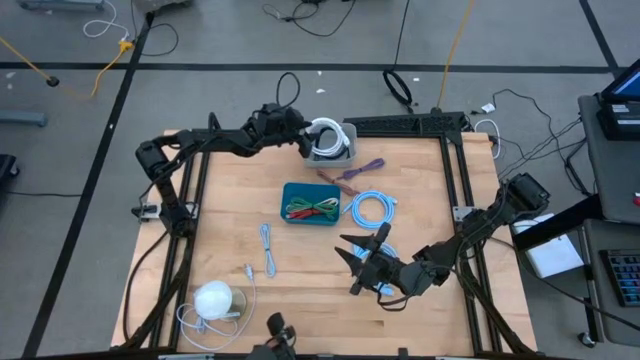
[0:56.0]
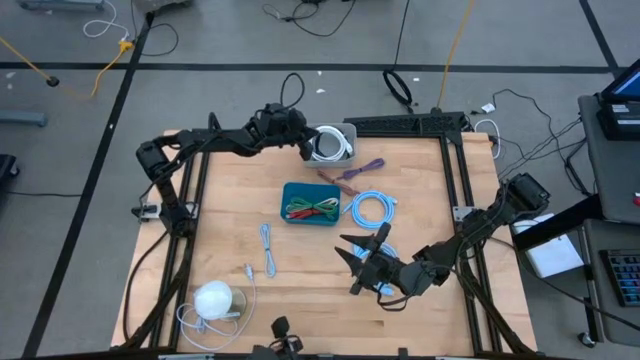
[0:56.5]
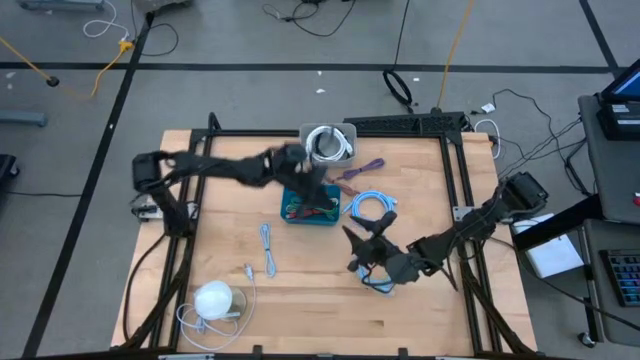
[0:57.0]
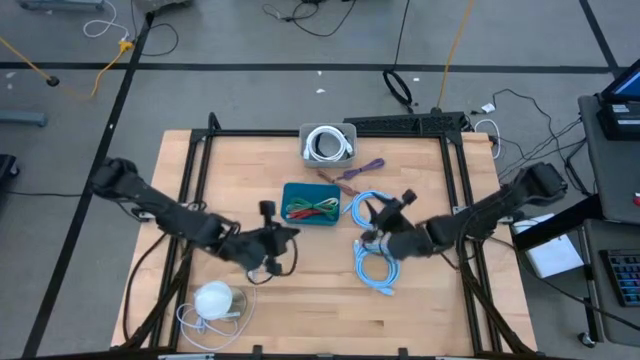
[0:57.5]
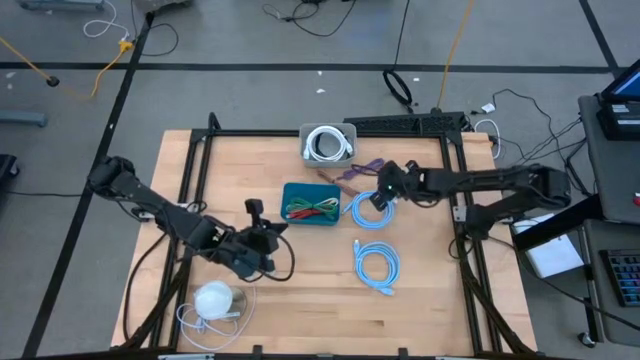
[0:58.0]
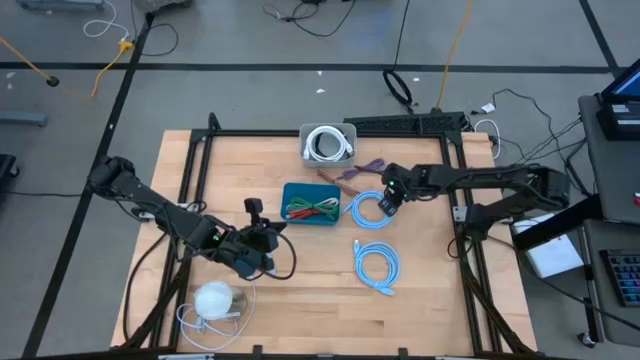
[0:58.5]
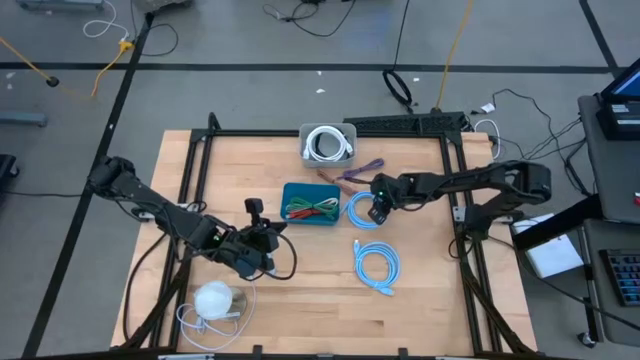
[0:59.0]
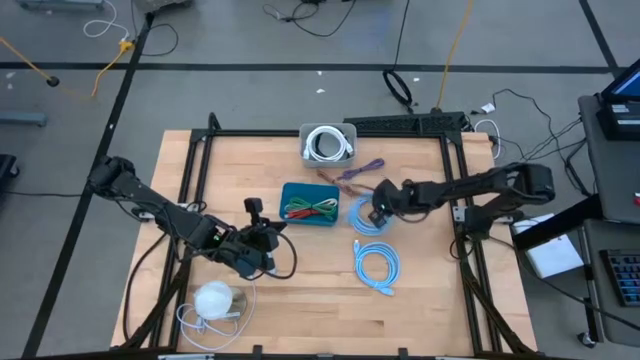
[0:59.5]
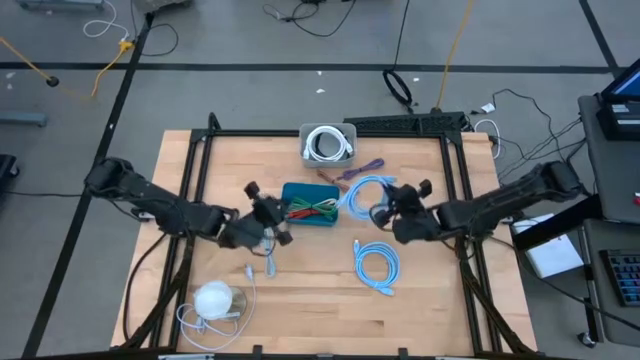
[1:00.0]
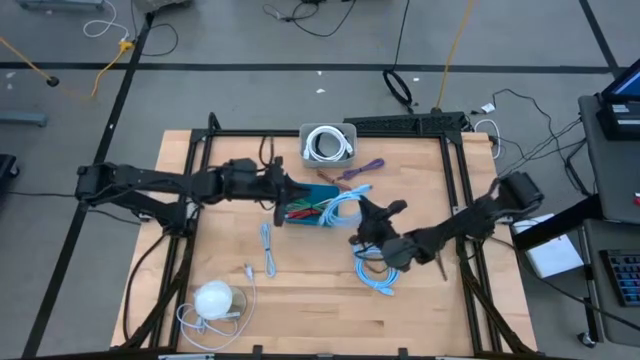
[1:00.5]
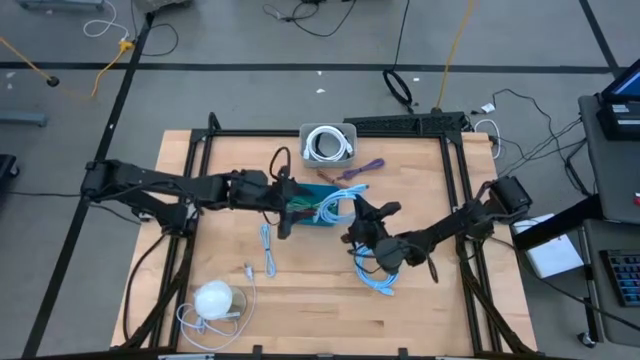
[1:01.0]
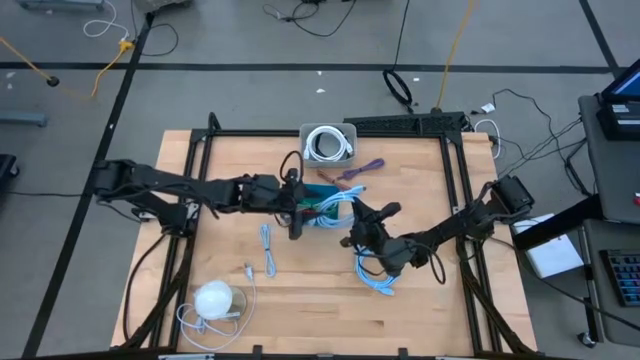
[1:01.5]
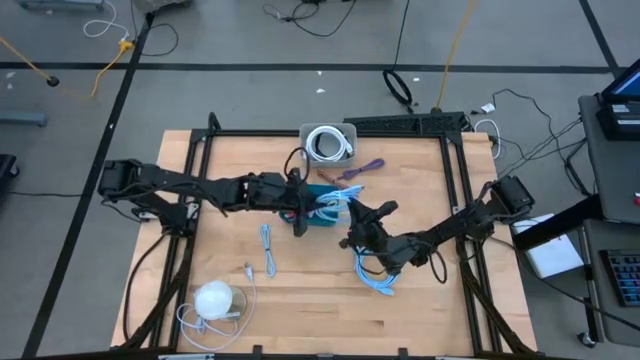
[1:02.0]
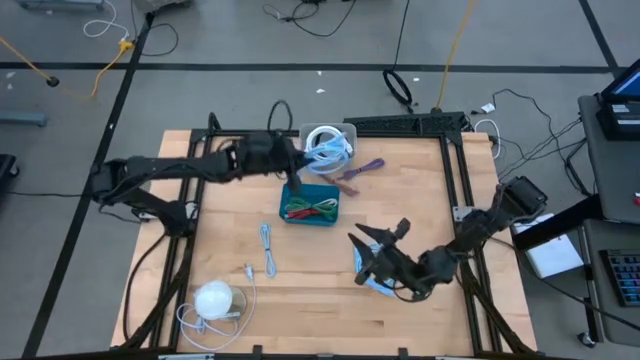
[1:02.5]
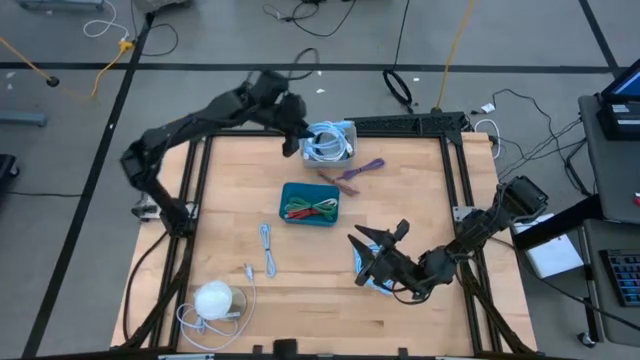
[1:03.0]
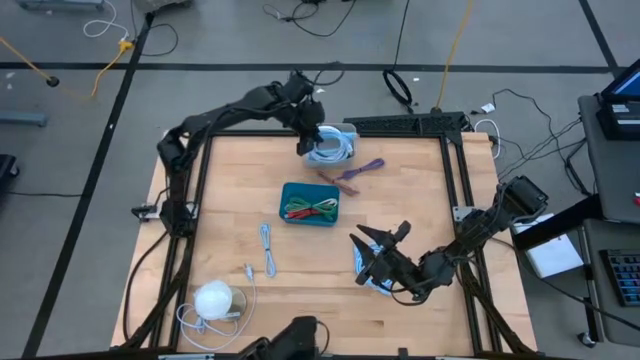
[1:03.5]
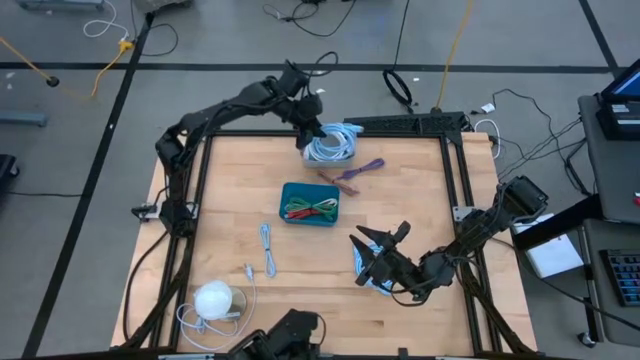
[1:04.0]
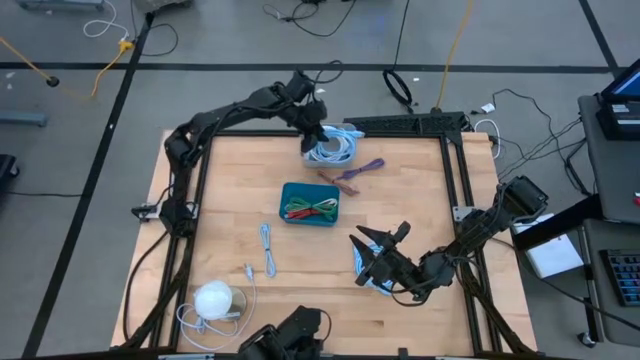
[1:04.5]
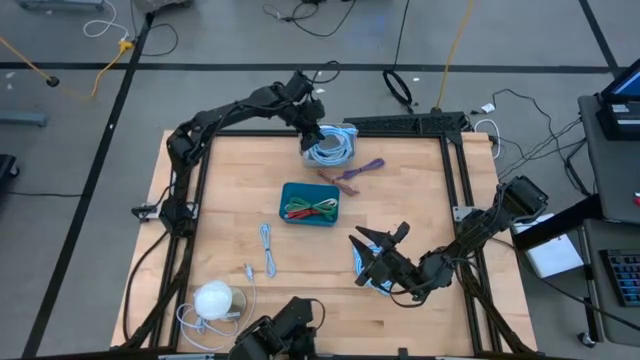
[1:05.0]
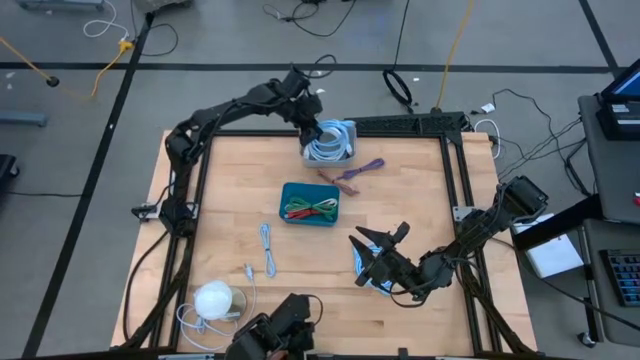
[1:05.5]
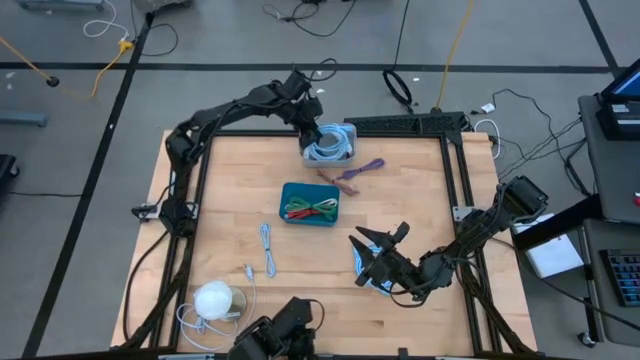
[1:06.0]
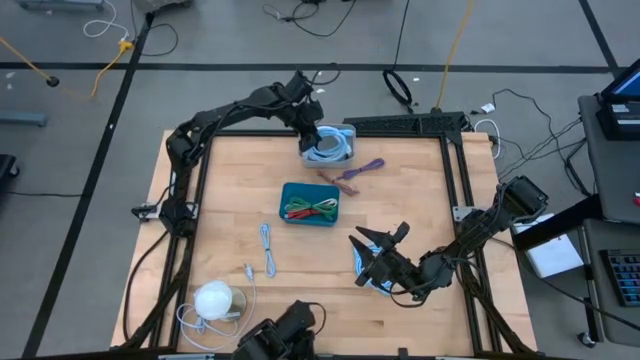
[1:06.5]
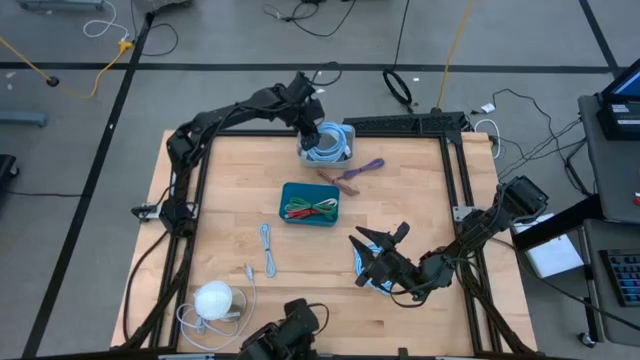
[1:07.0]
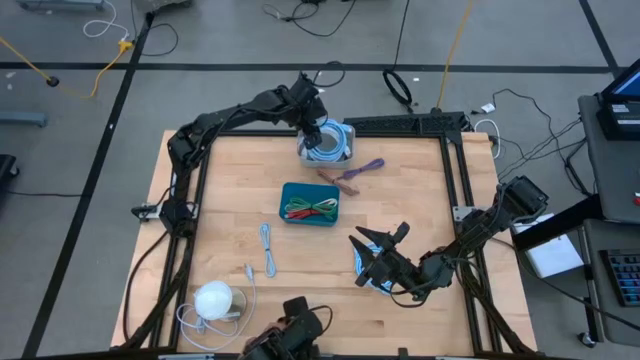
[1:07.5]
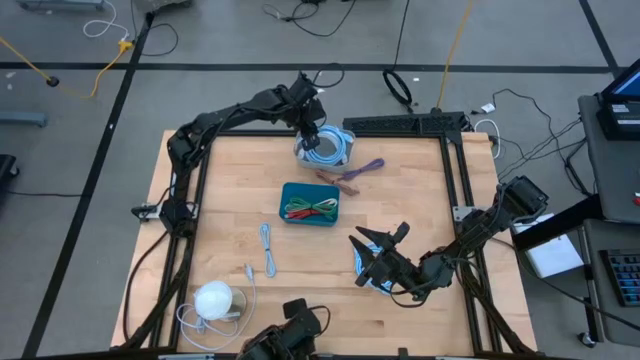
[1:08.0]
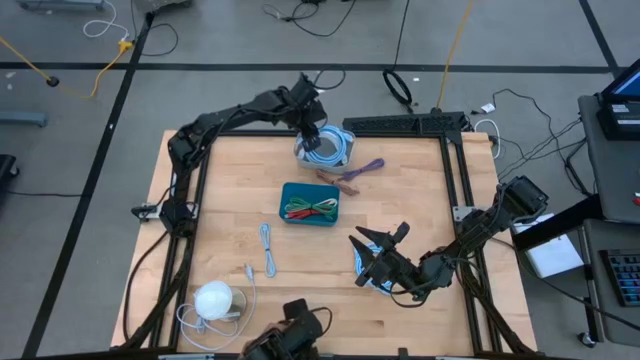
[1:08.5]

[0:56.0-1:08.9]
Task: Pick & Place USB Port
Put the blue HDMI cable into the gray bin

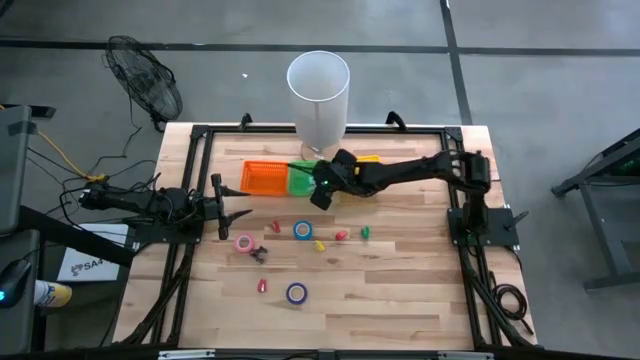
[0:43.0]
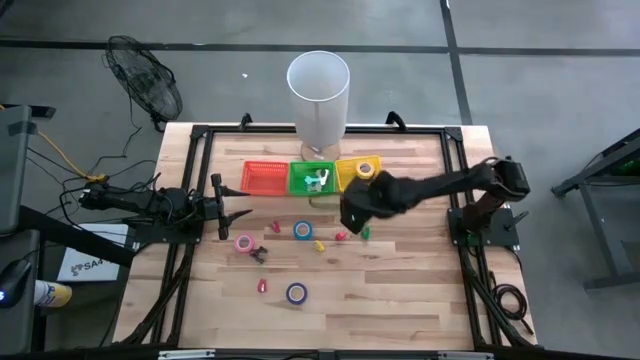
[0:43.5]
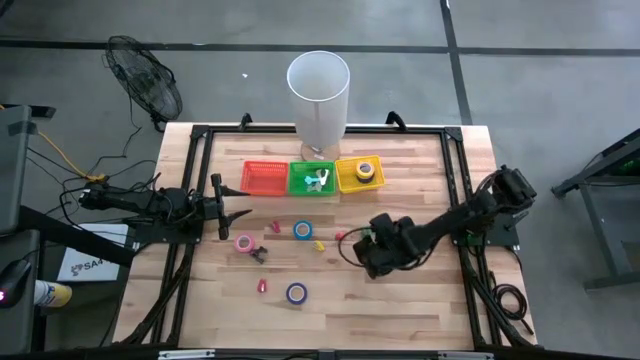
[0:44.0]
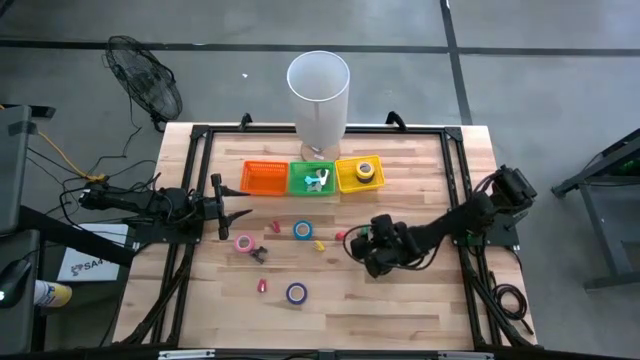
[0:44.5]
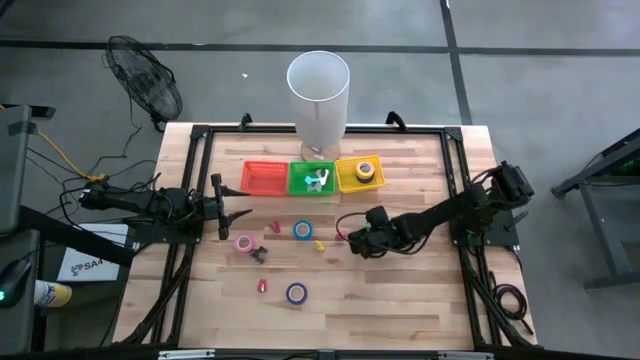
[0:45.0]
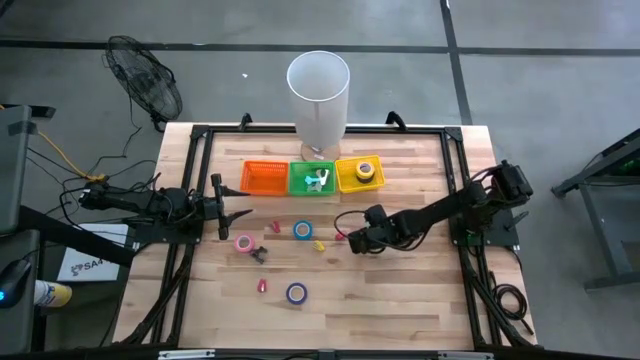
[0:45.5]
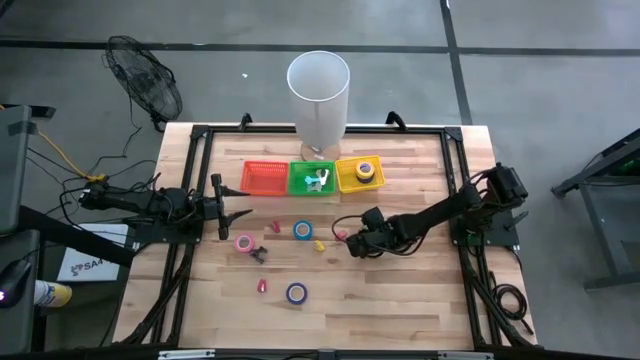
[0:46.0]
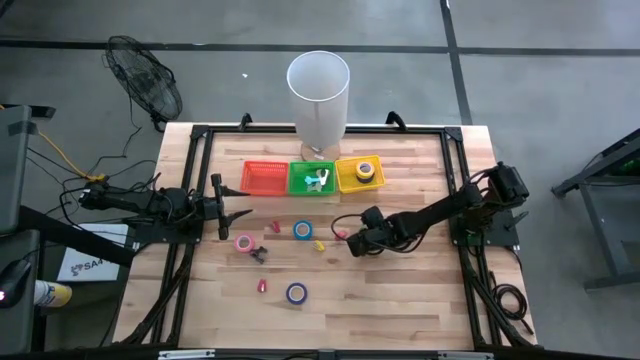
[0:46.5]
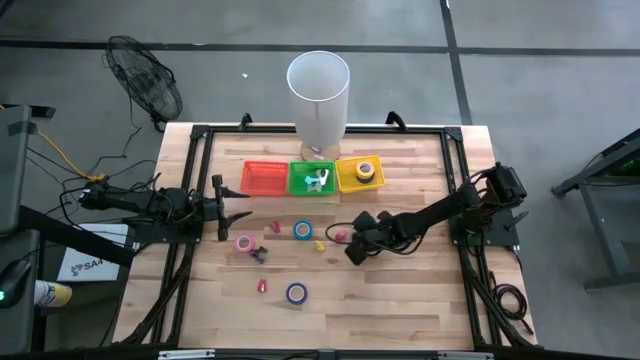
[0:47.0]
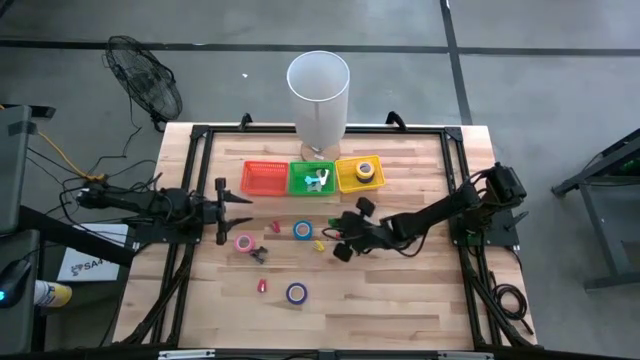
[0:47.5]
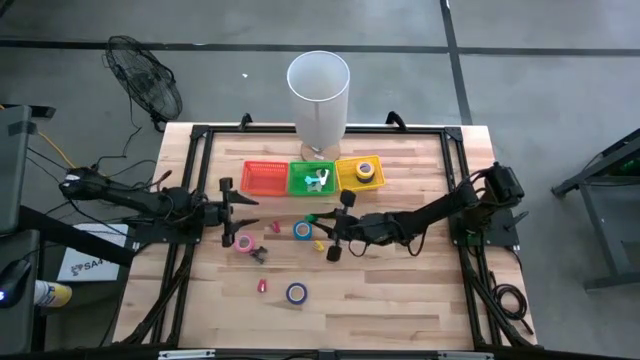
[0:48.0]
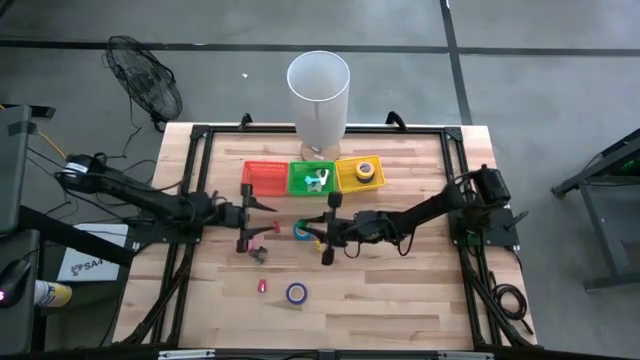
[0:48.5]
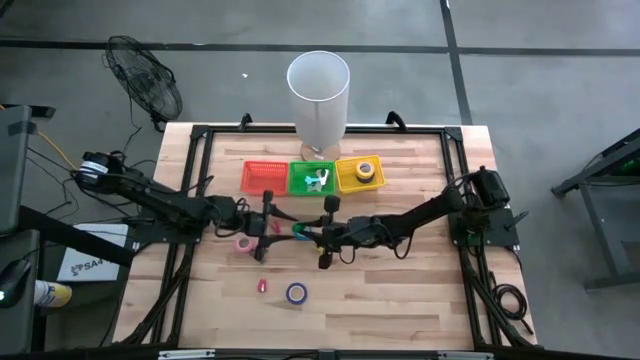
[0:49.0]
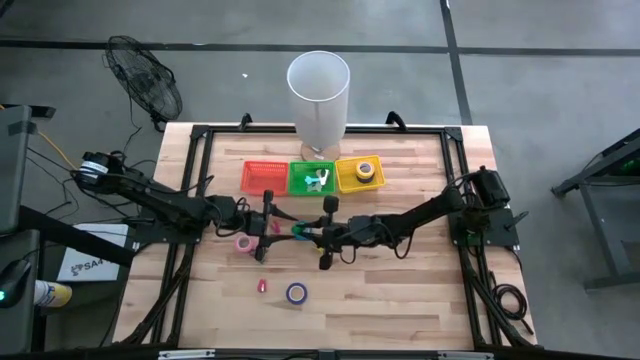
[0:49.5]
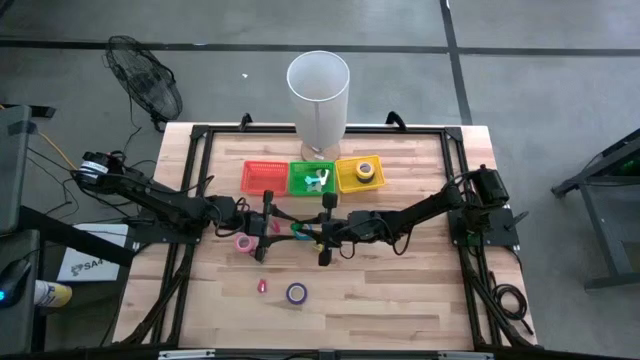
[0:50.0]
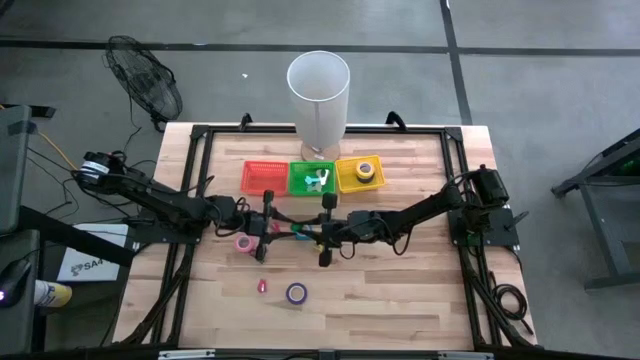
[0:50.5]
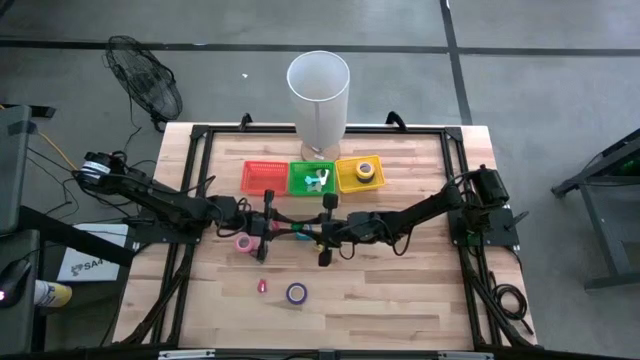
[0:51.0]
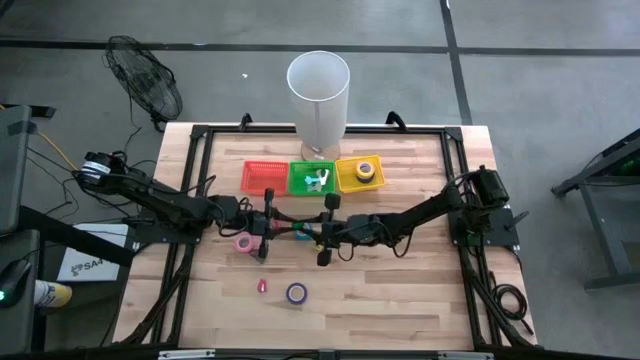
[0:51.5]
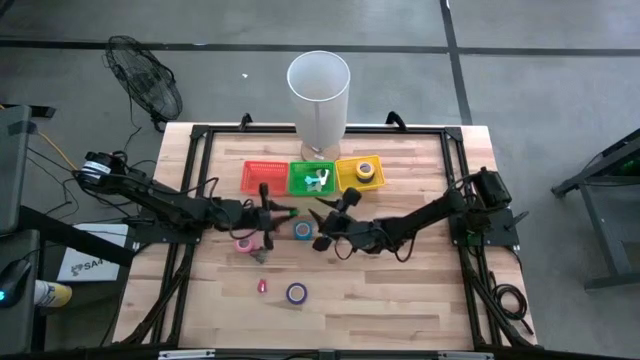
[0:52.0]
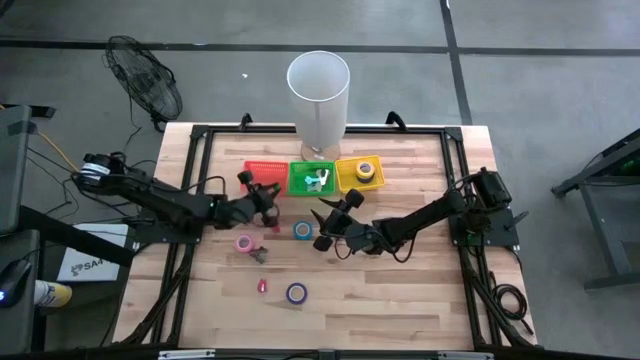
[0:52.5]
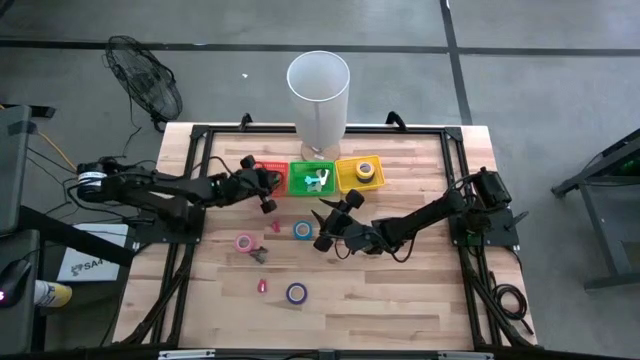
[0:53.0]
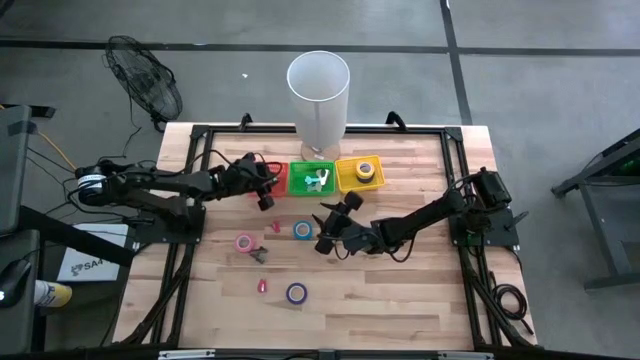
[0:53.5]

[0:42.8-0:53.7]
Task: Pick and place Stapler, Stapler remover, tape
Put the green stapler into the orange bin
